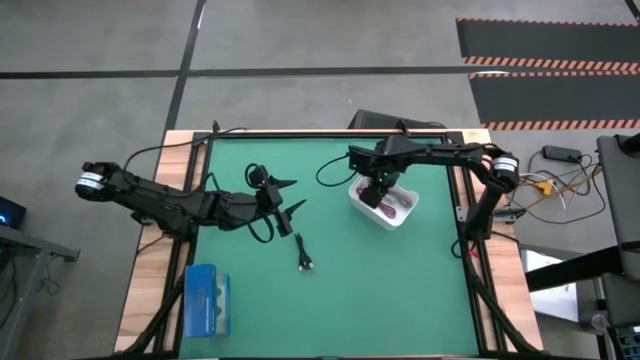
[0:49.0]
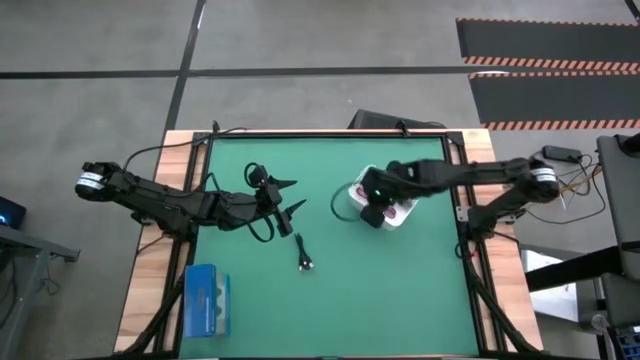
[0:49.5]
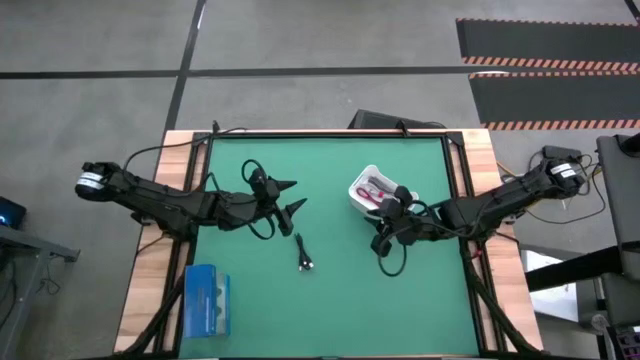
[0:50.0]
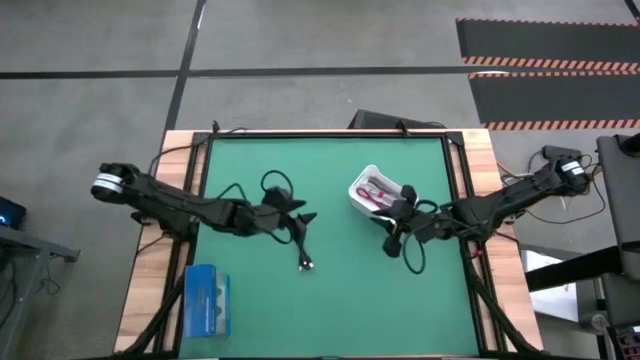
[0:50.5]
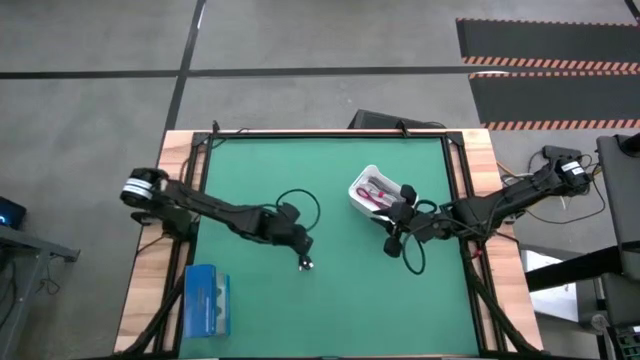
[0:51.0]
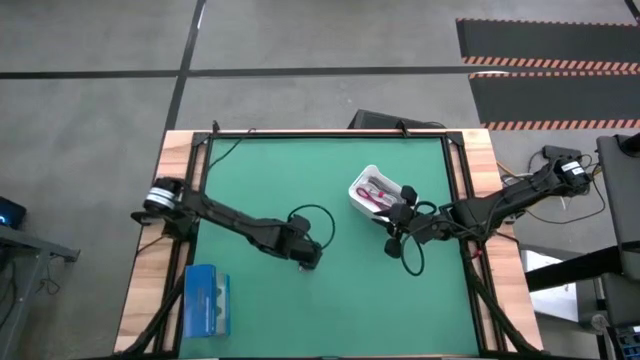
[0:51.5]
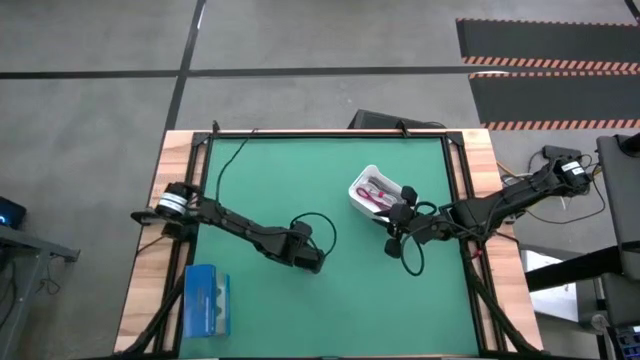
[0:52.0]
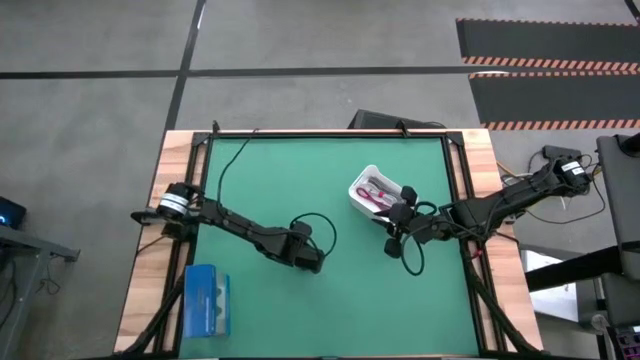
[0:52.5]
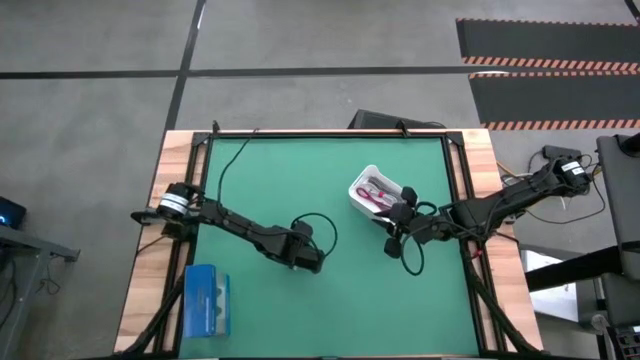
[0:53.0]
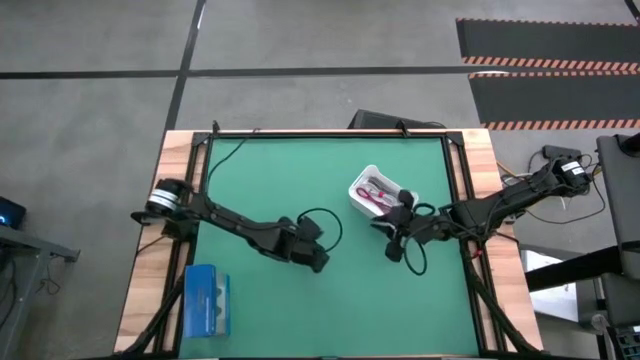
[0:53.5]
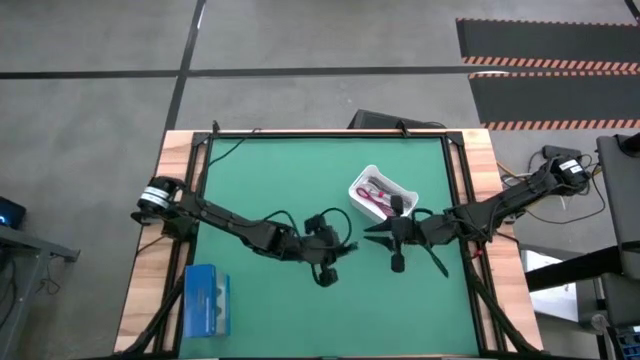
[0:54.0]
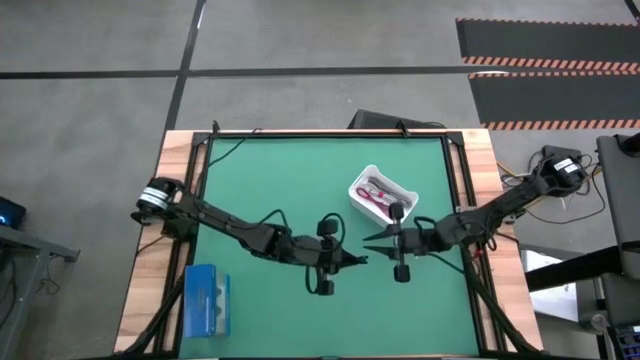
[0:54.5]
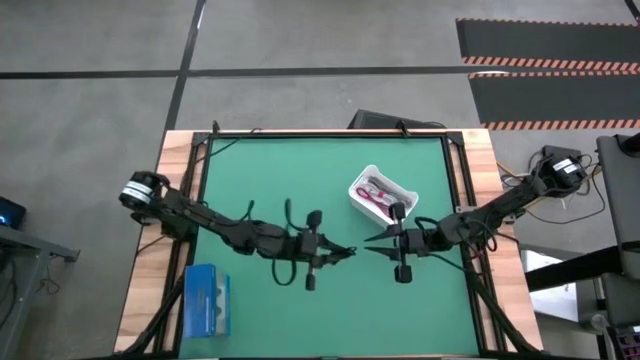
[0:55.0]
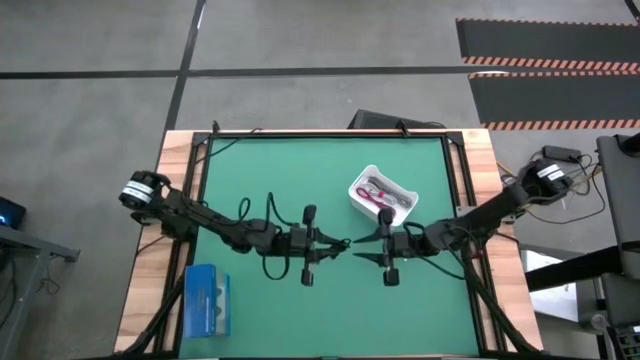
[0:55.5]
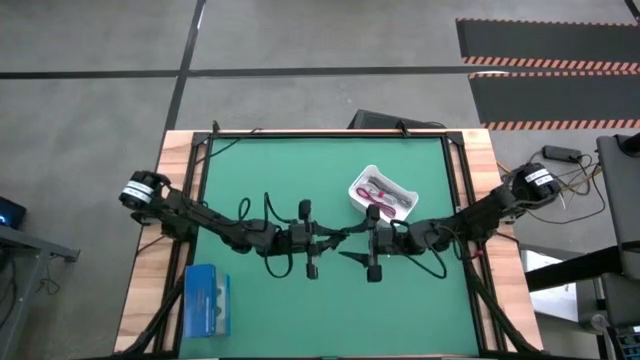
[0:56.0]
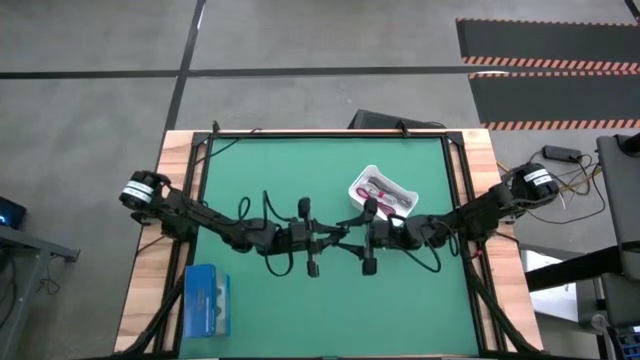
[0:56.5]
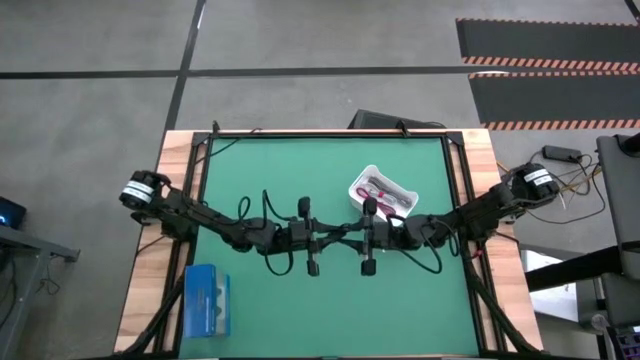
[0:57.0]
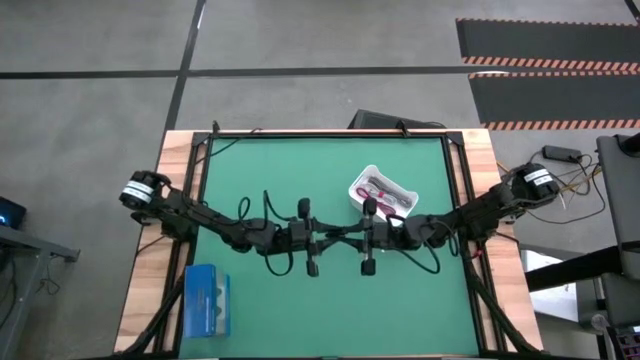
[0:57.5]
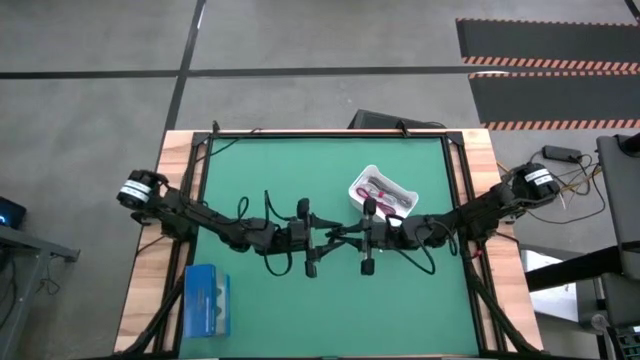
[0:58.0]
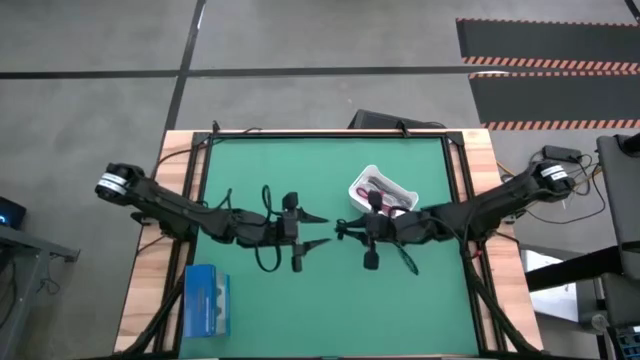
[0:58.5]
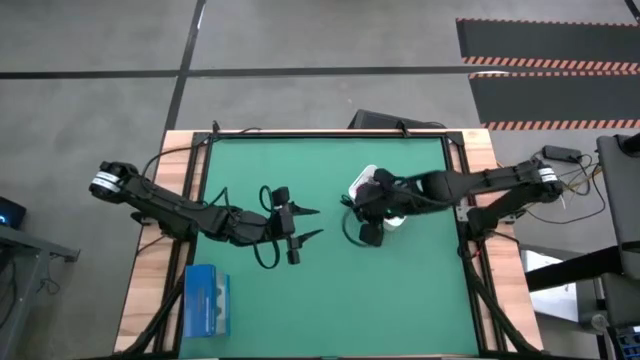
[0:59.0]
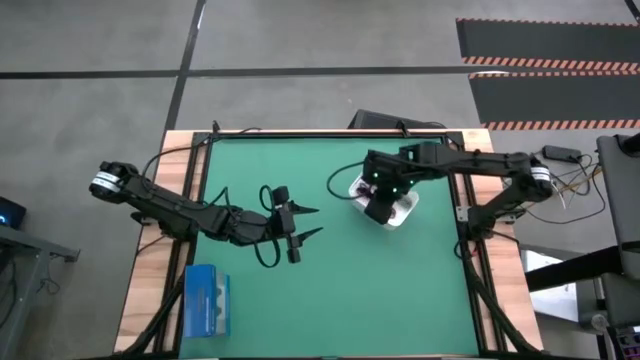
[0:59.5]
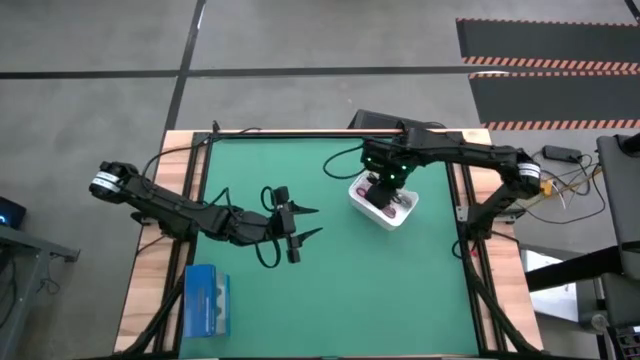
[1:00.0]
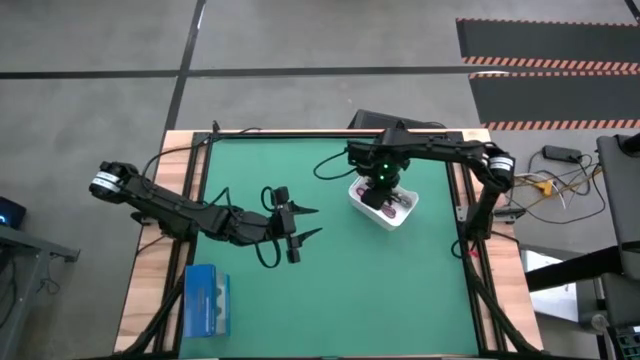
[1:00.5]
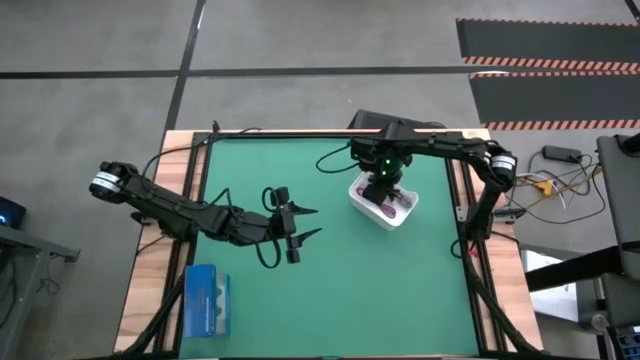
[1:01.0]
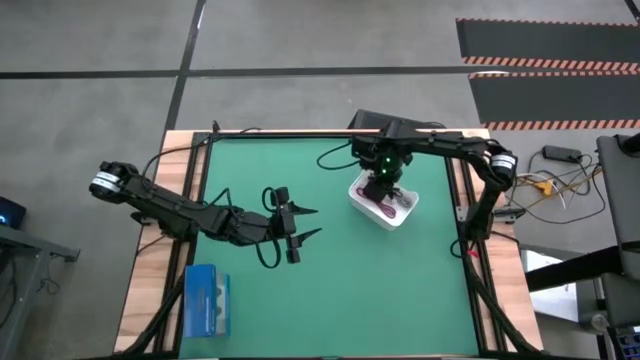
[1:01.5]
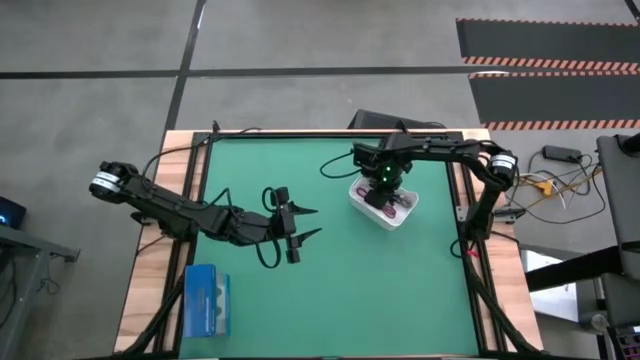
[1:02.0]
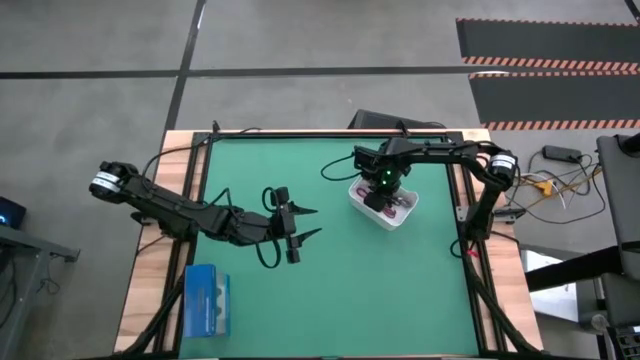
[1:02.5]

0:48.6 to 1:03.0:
Task: Pick and place USB-C Cables
Put the black charger cable into the white bin

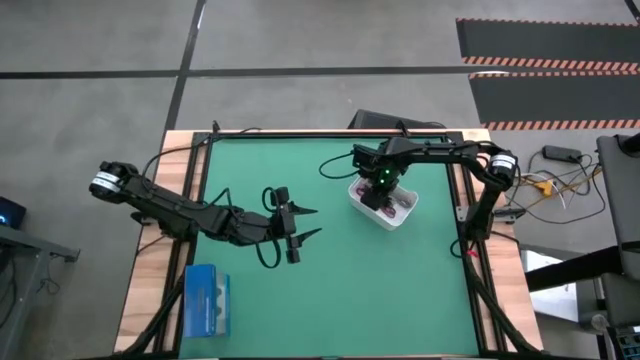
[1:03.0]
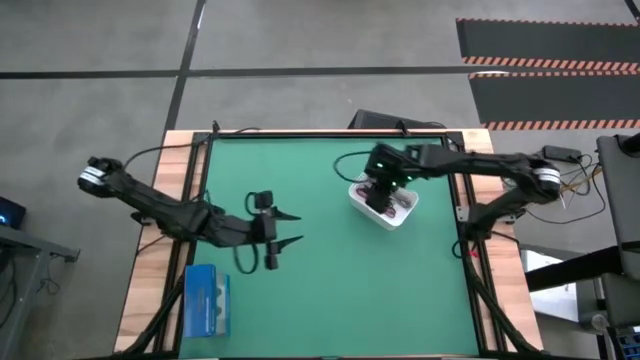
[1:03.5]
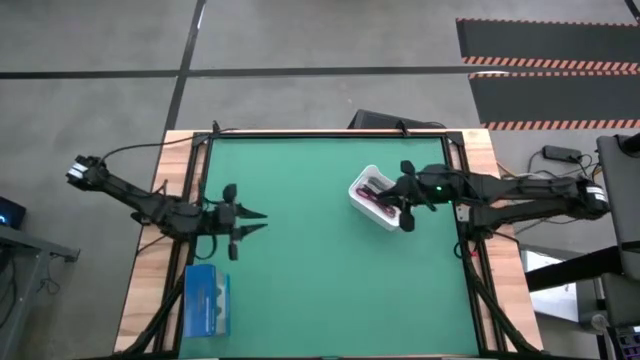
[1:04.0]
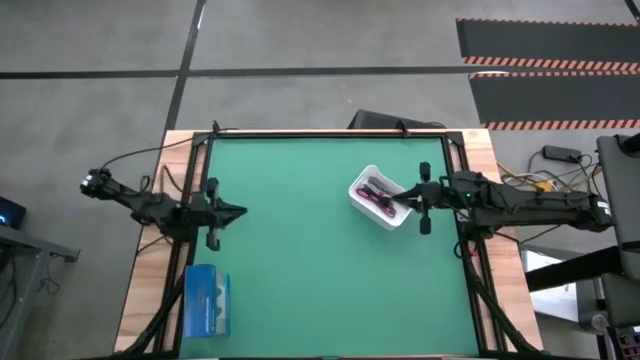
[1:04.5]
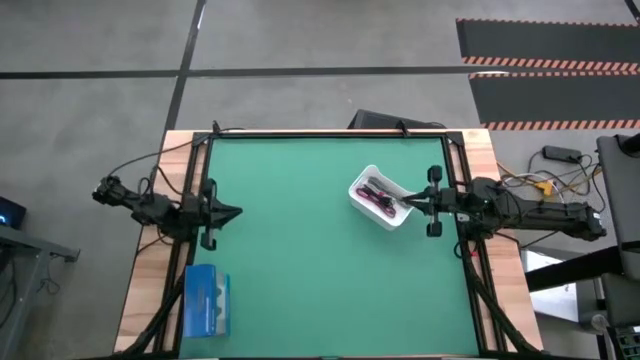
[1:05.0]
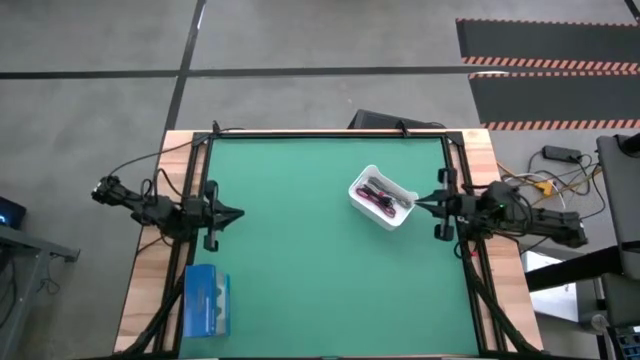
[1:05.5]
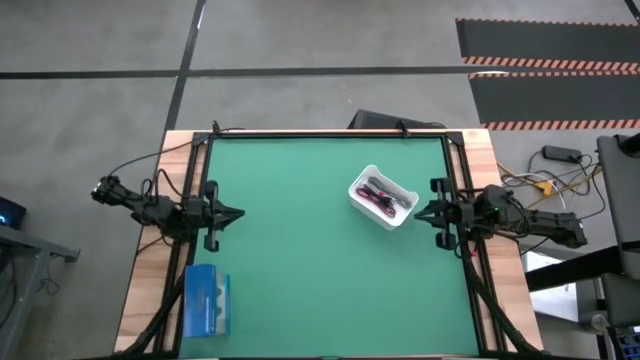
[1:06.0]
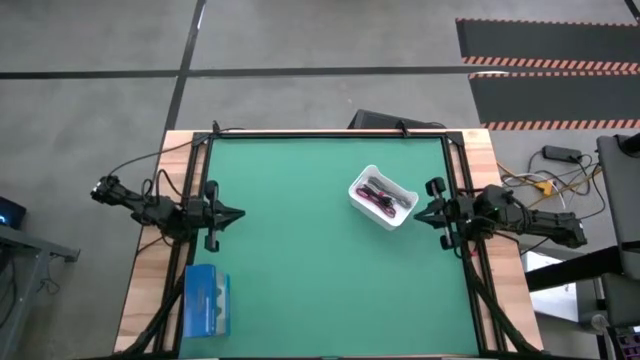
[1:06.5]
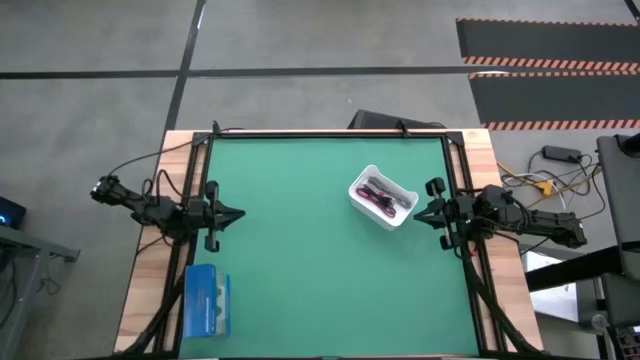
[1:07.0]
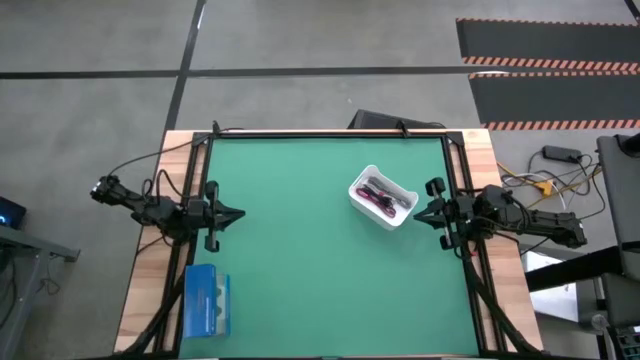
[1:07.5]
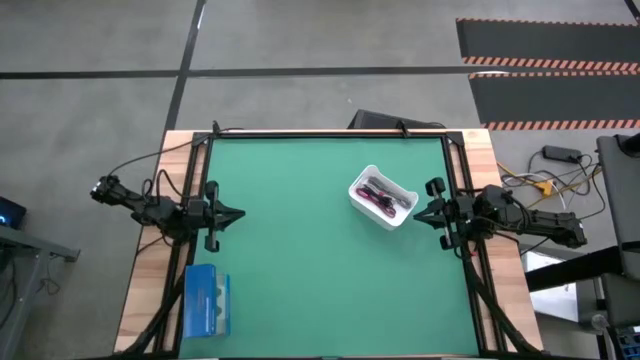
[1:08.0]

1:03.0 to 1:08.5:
Return to Home Position
